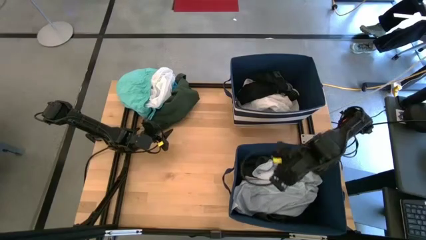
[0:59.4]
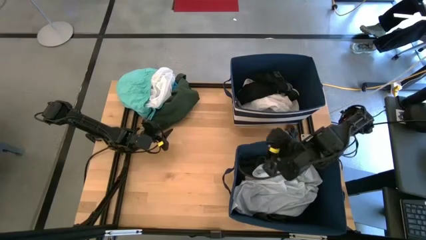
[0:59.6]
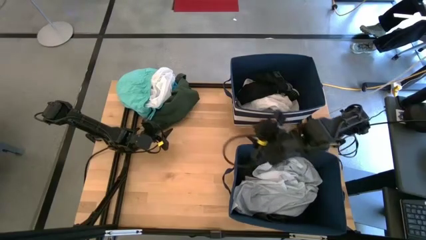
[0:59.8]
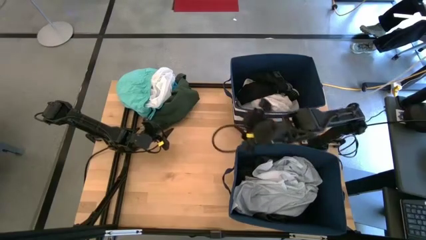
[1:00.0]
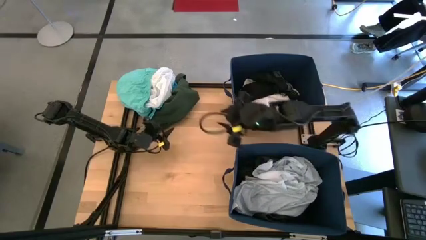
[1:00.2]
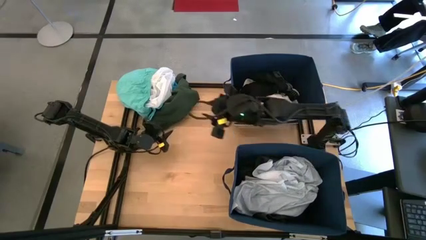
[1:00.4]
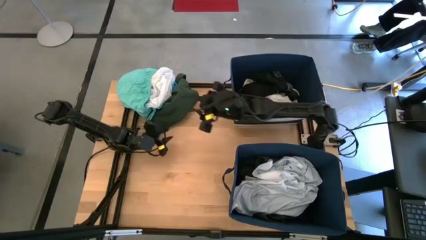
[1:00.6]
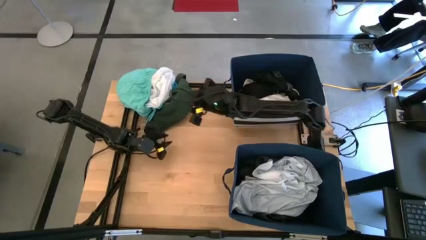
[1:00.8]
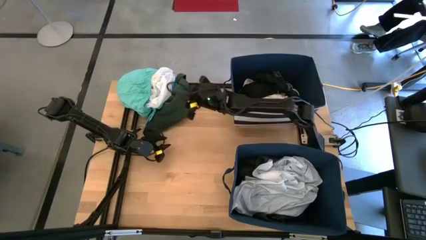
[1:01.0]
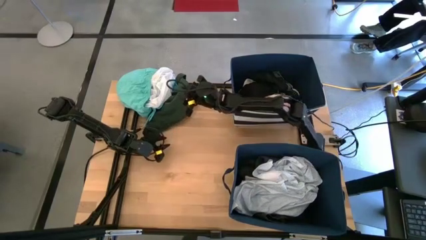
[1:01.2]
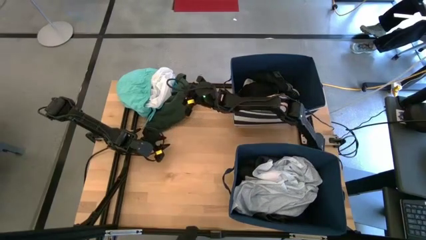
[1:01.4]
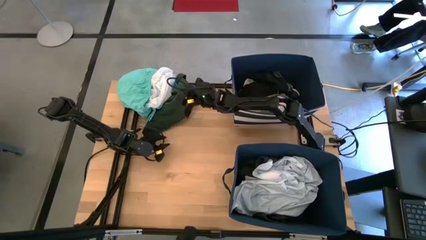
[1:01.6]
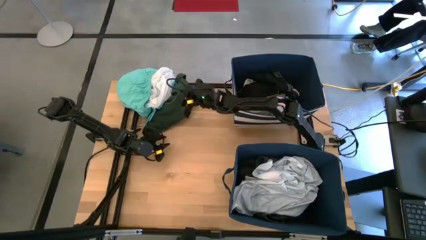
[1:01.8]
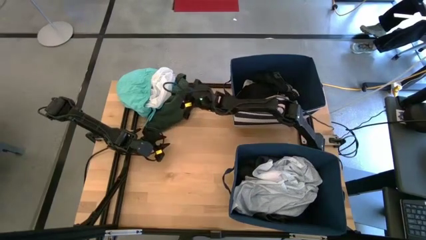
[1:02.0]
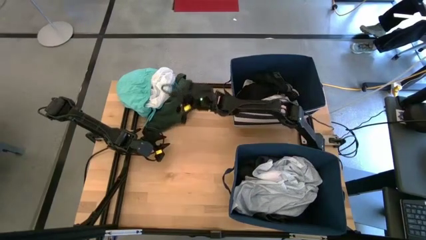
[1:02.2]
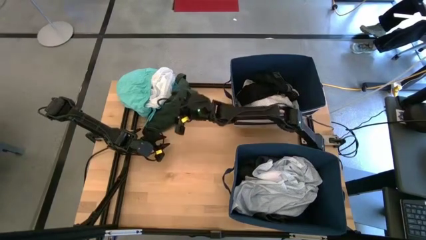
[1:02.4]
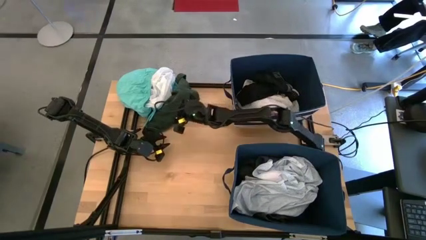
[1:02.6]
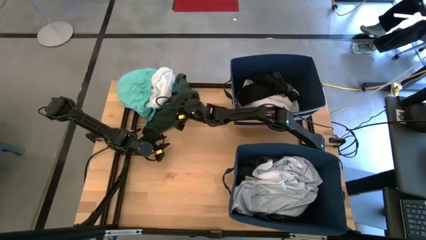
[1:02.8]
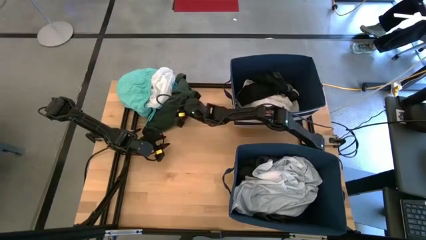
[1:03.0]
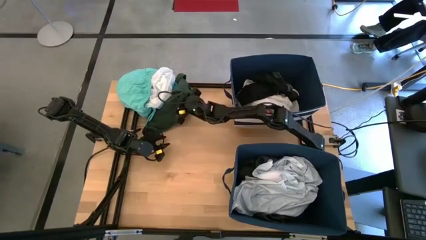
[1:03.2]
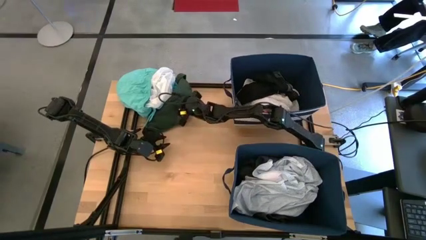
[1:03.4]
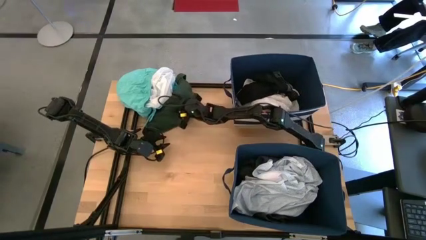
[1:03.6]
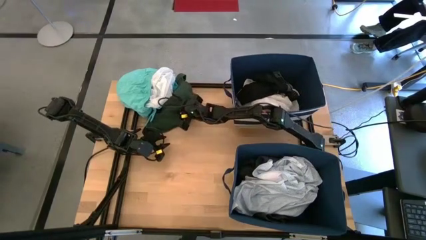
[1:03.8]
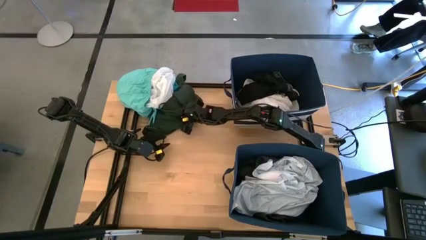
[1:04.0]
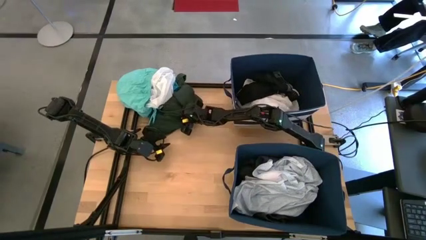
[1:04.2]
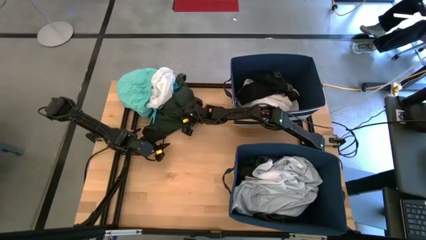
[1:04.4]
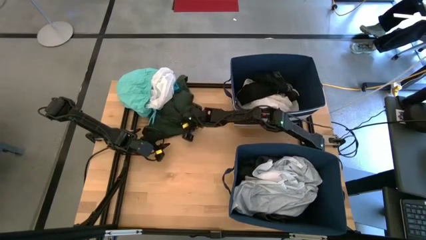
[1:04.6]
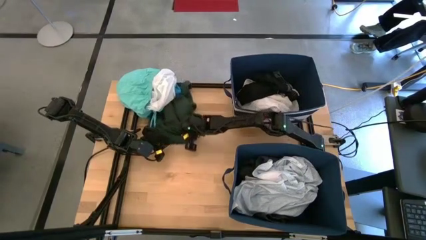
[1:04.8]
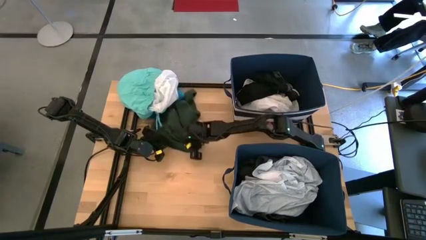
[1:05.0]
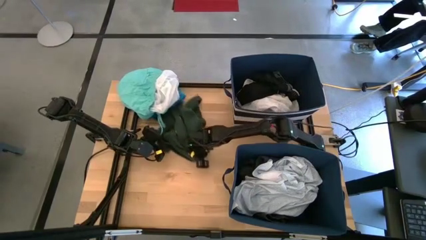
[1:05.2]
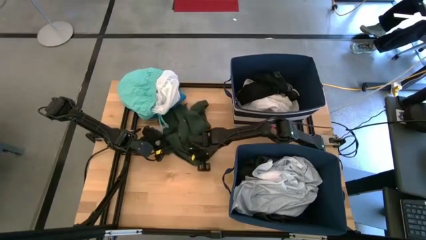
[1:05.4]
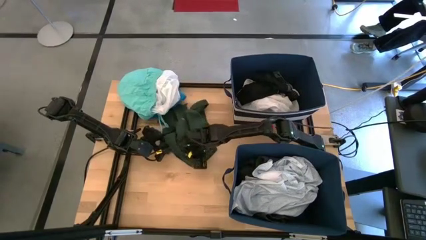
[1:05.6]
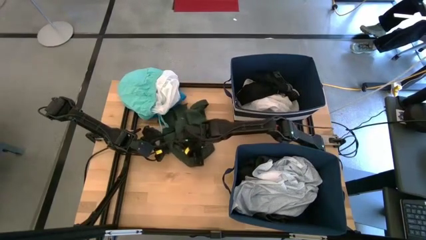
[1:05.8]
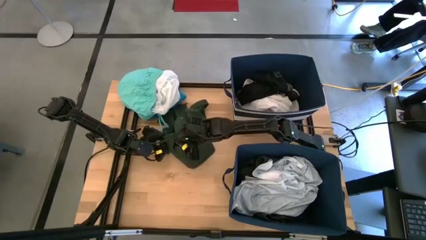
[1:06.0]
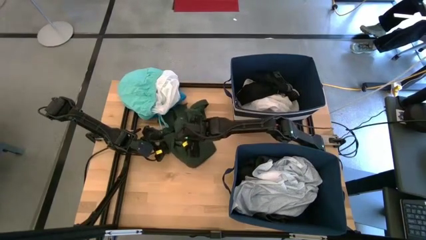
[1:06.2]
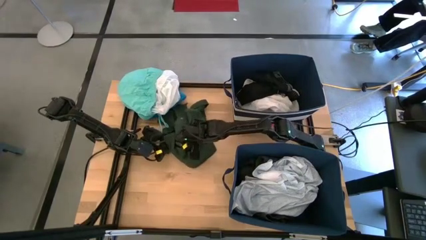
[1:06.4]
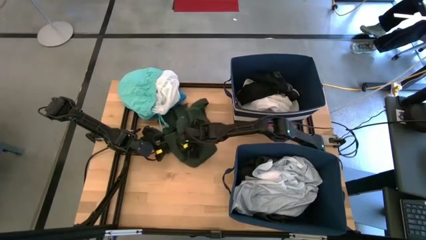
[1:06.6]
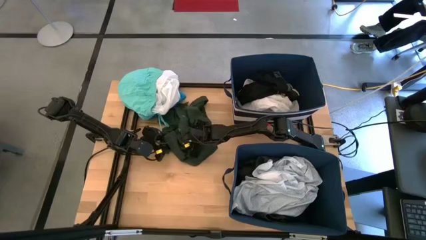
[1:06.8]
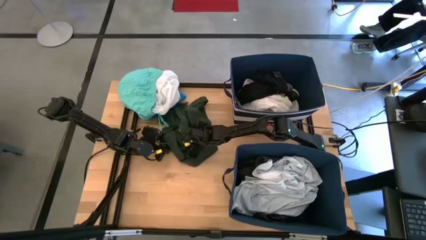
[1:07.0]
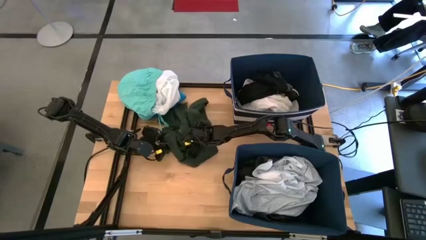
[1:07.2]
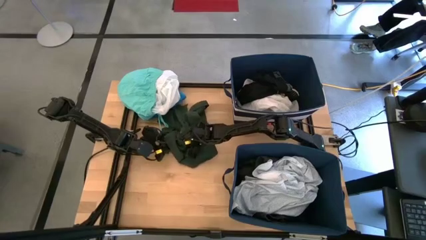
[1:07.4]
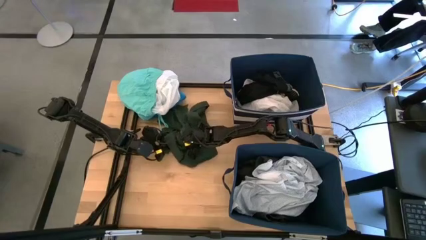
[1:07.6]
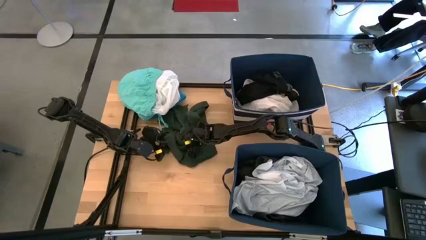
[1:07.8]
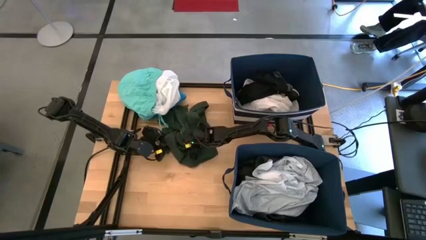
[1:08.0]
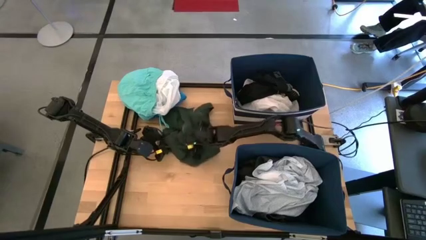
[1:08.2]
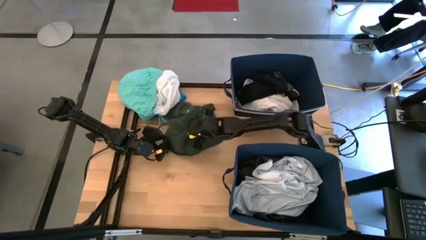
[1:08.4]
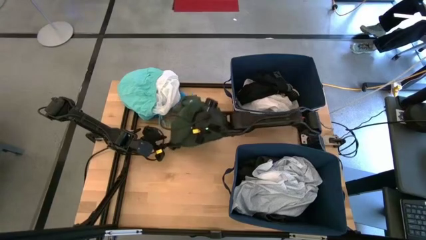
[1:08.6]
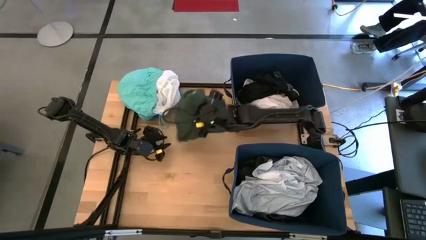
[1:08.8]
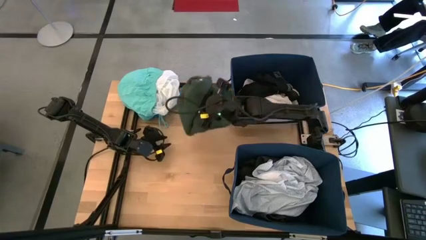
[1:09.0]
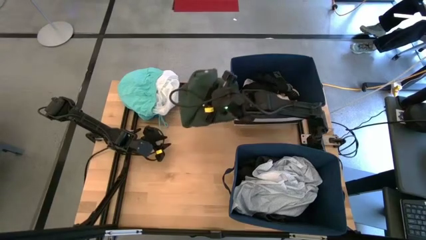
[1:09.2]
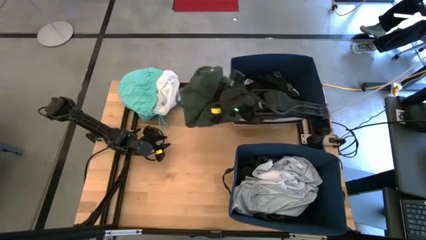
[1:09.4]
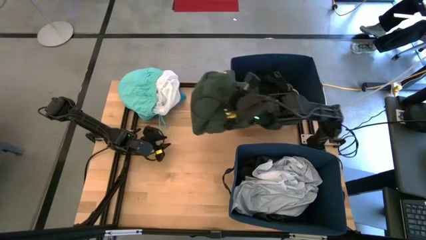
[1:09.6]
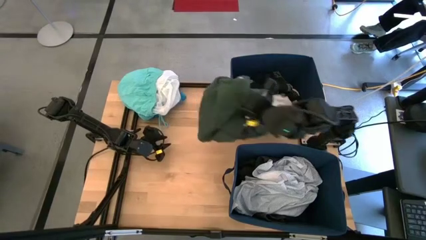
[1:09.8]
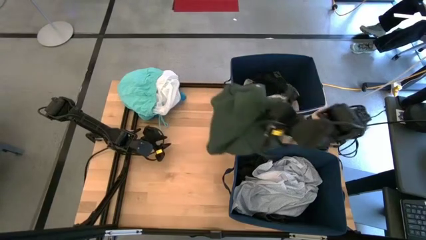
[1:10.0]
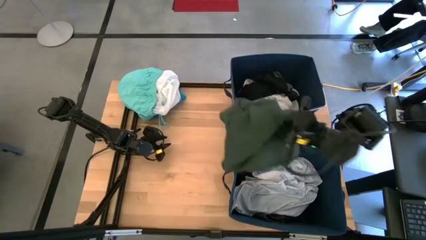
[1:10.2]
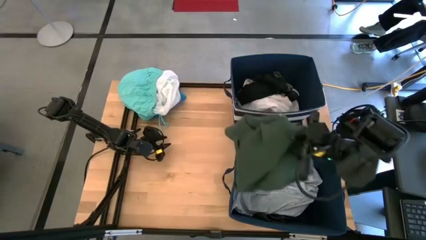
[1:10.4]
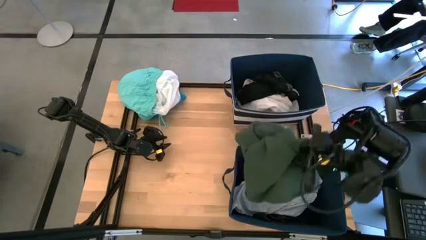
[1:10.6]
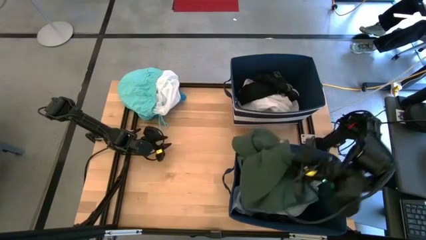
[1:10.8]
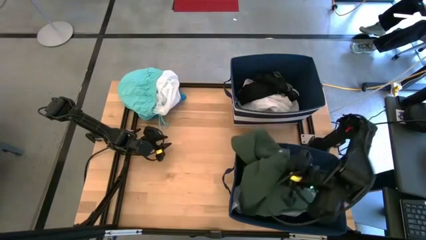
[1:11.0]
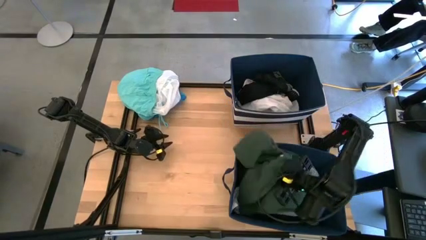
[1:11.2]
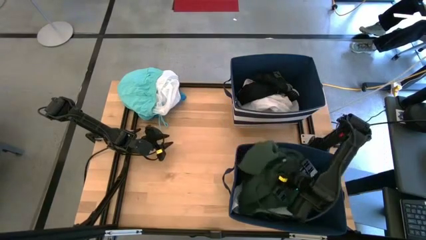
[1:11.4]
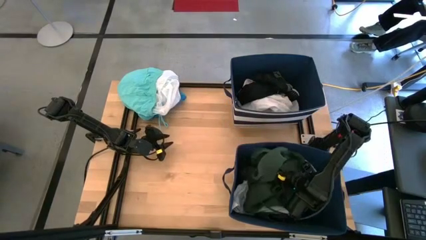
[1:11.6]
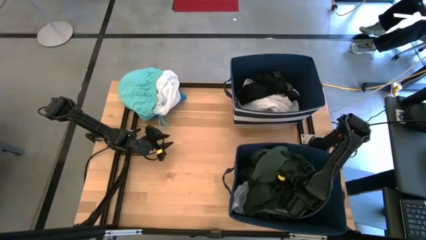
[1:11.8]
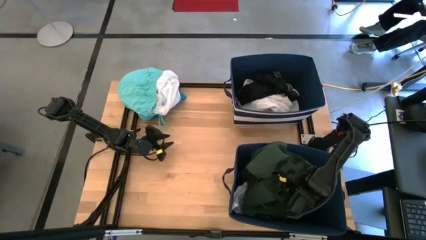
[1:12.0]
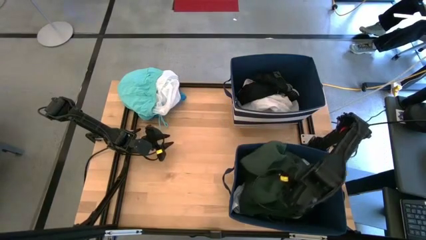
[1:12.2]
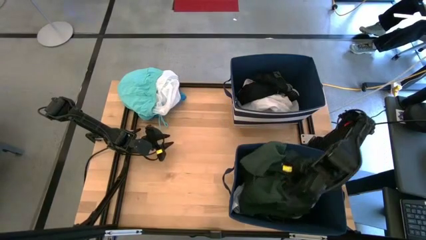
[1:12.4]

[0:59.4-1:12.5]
Task: Sort clothes
Put the green long sleeve into the bottom blue laundry organizer
